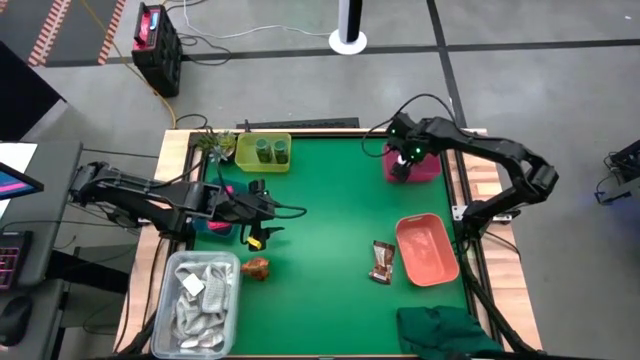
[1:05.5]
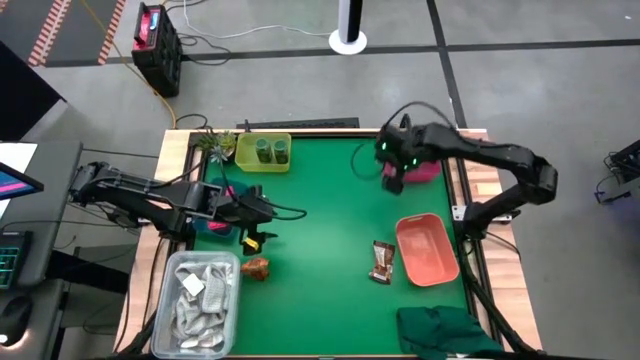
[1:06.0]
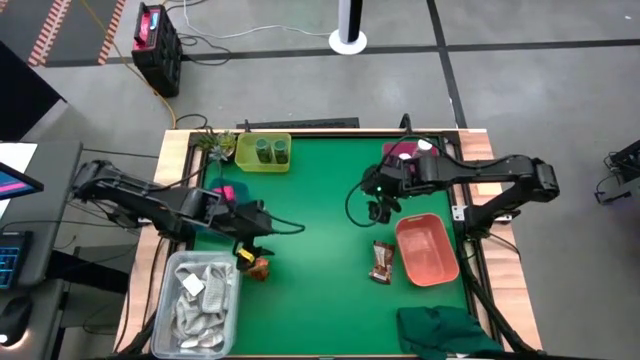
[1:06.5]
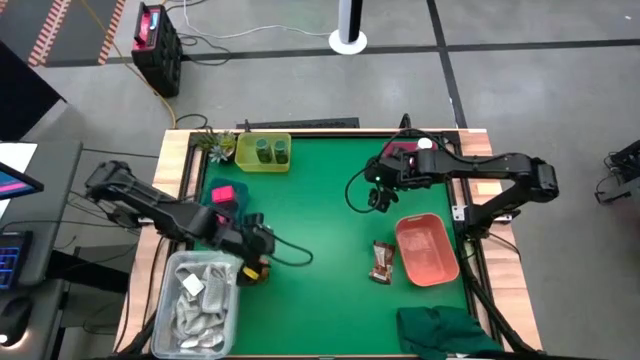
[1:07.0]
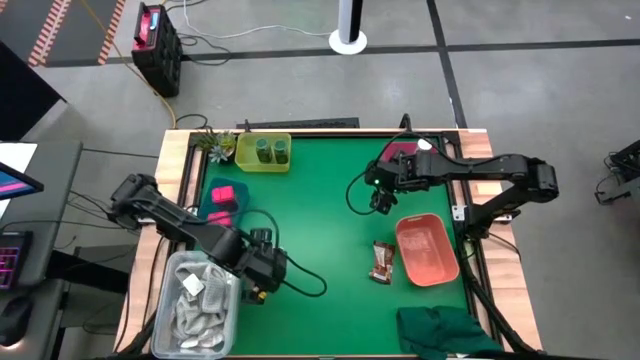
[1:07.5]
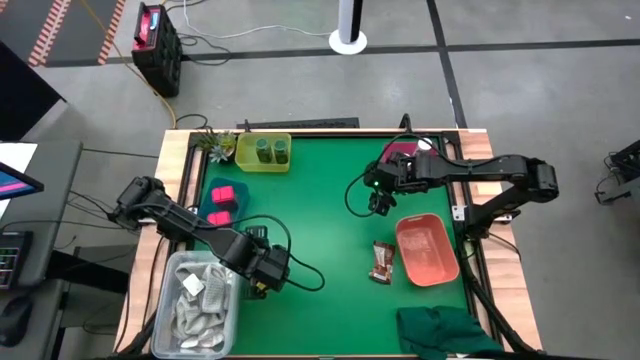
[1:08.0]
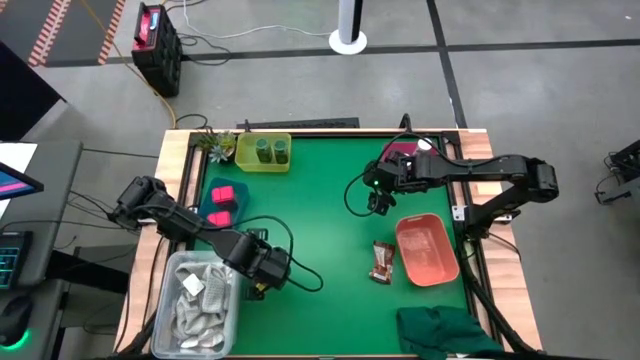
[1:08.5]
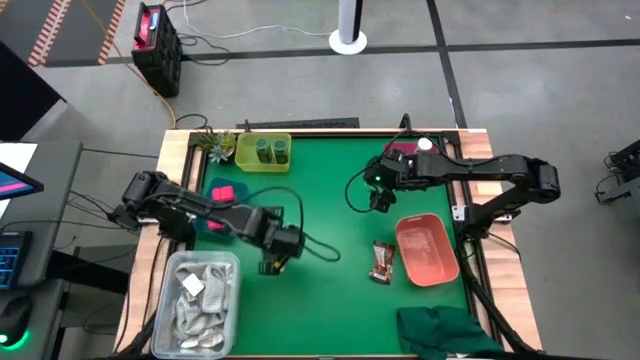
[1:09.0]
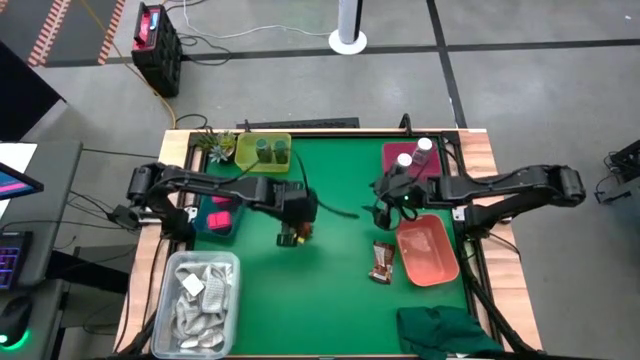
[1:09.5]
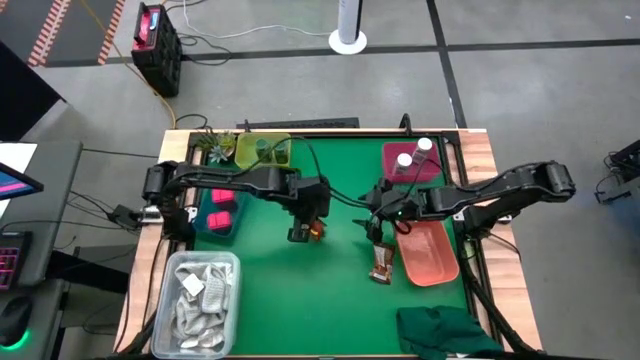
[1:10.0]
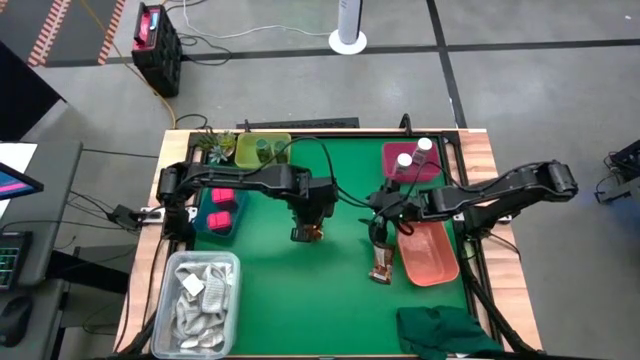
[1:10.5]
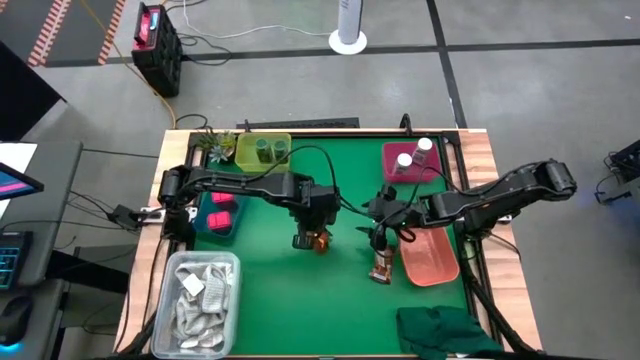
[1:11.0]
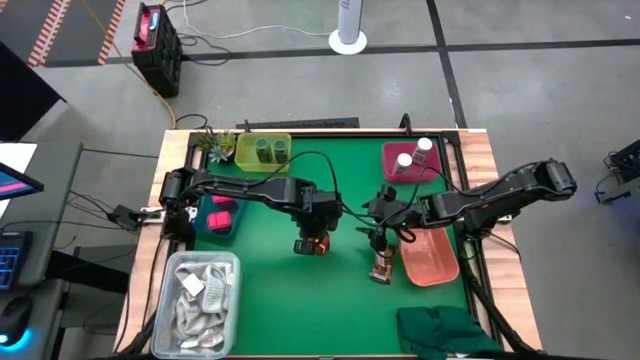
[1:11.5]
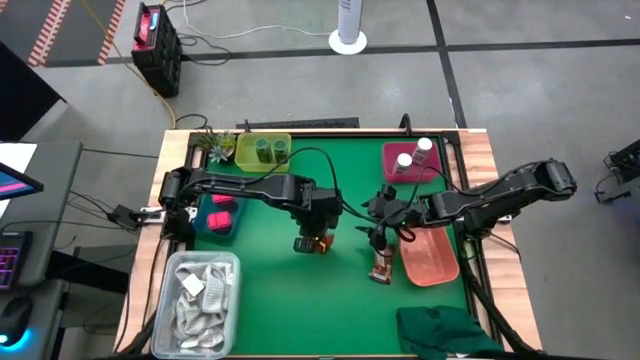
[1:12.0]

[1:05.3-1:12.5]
Task: Sort spices by type
Put the bottom left orange seasoning pack into the orange bin

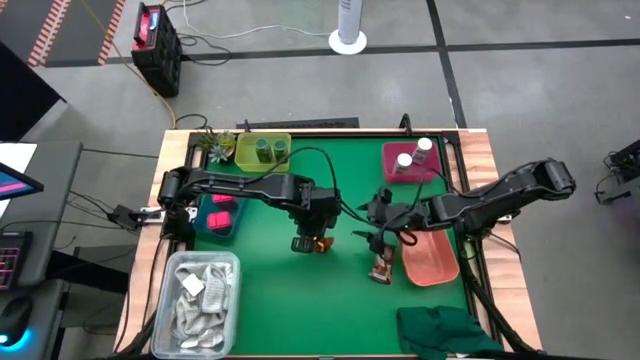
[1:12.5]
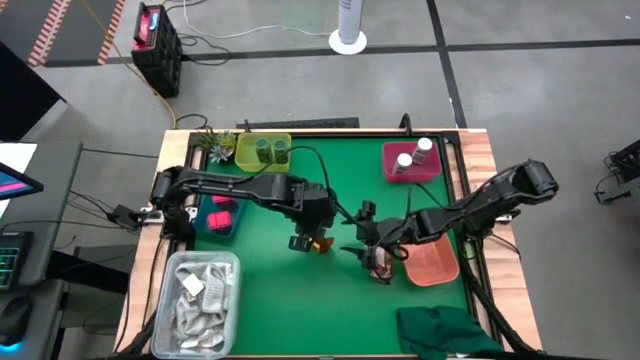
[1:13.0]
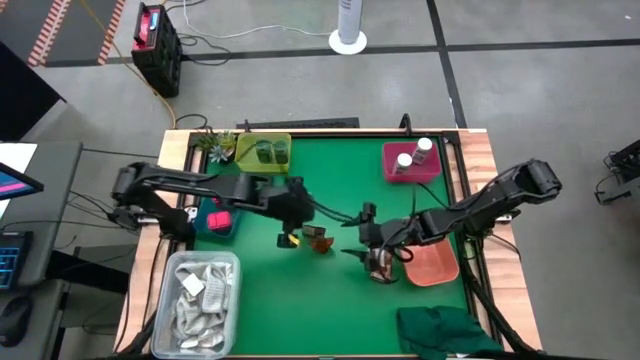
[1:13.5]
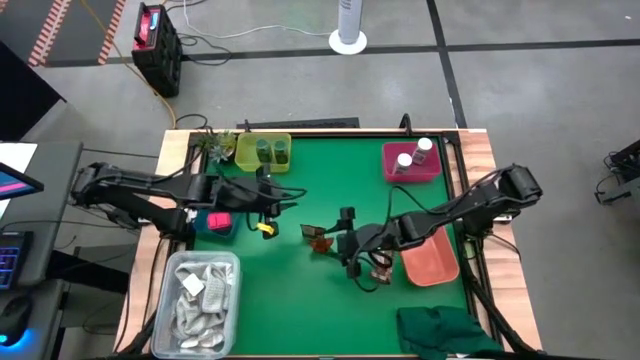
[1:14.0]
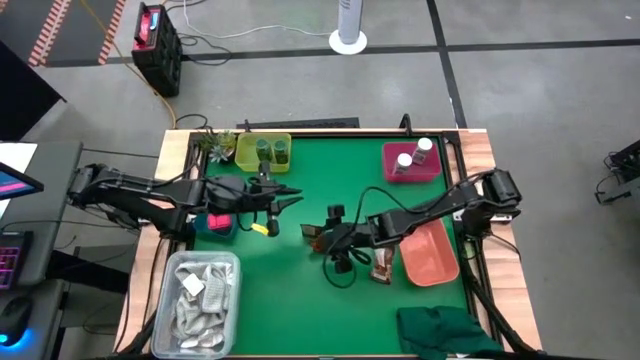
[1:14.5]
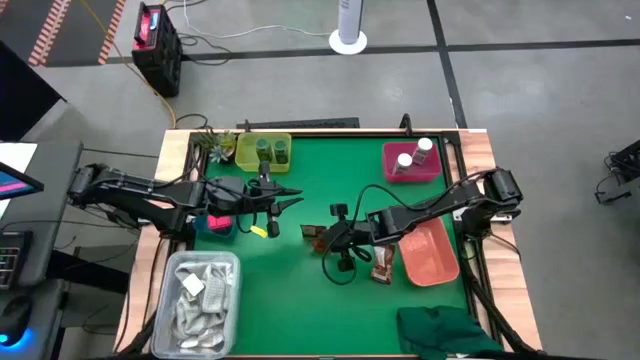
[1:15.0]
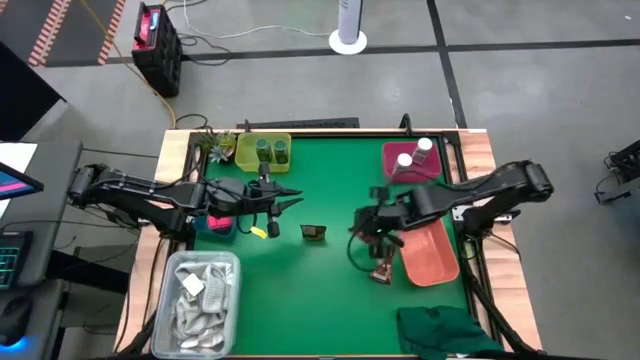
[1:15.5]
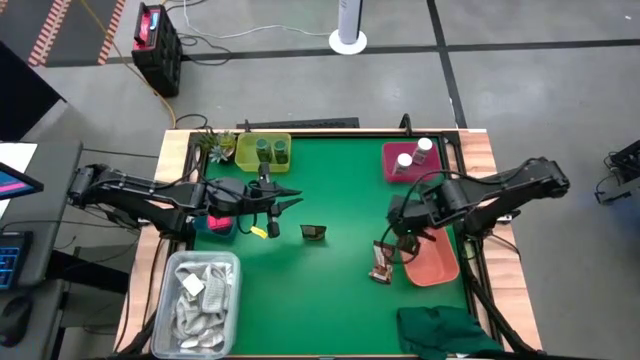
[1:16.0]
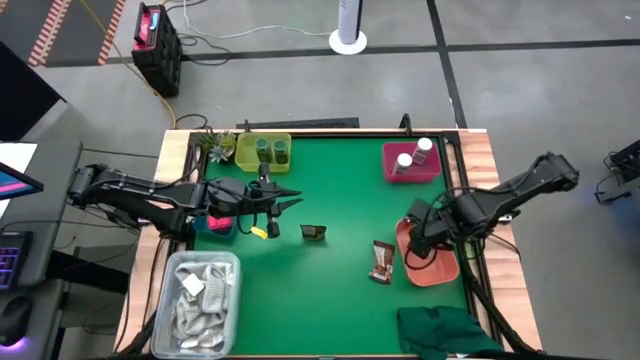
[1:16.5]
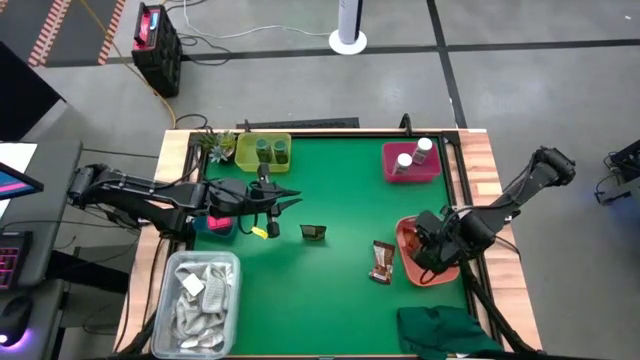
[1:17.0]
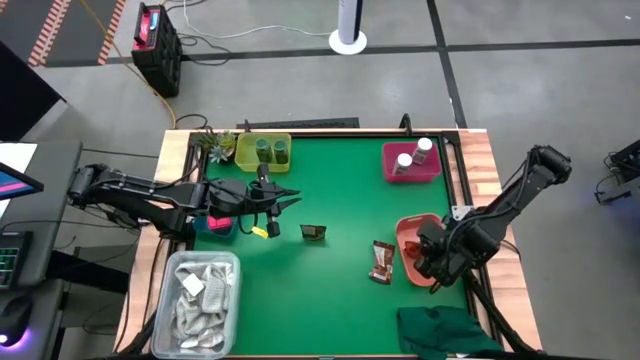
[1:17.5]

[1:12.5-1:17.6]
Put the middle orange seasoning bag into the orange bin

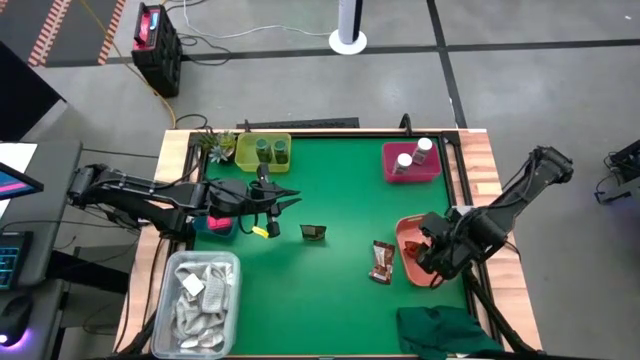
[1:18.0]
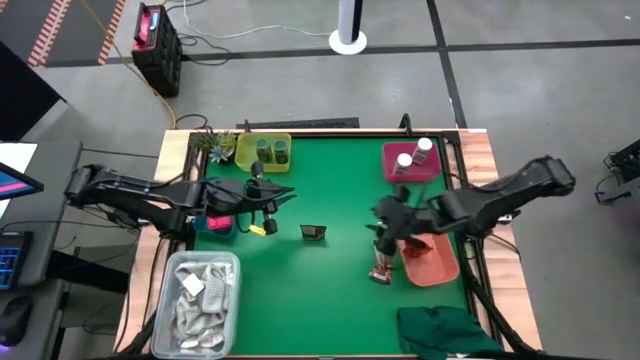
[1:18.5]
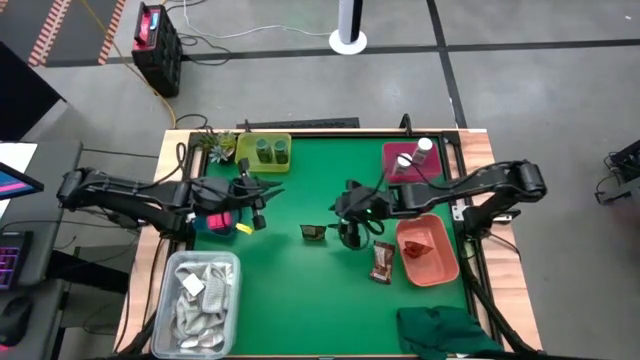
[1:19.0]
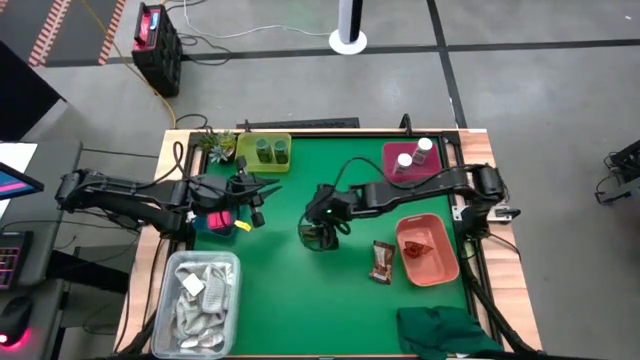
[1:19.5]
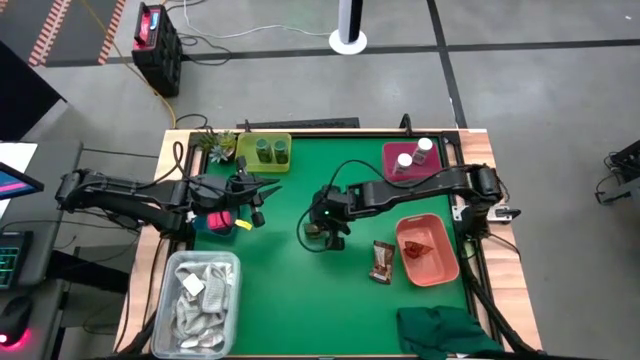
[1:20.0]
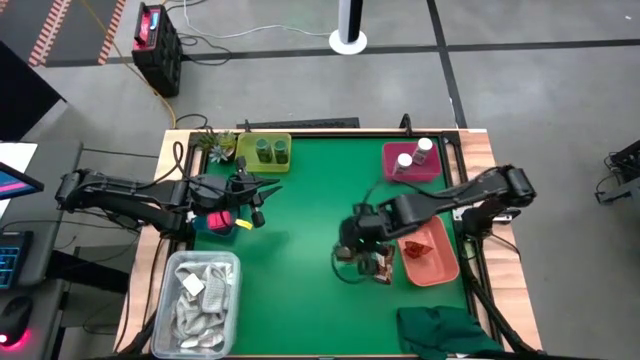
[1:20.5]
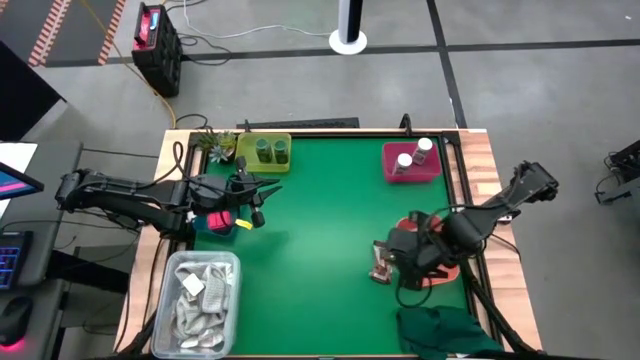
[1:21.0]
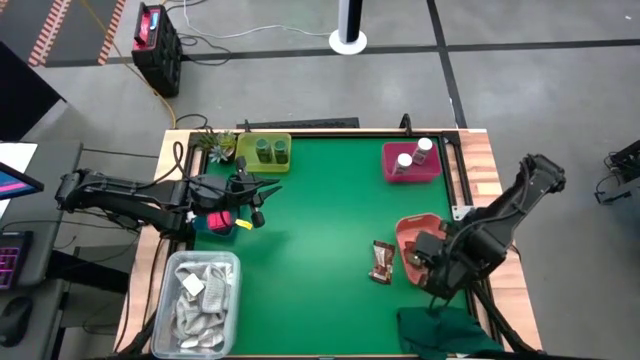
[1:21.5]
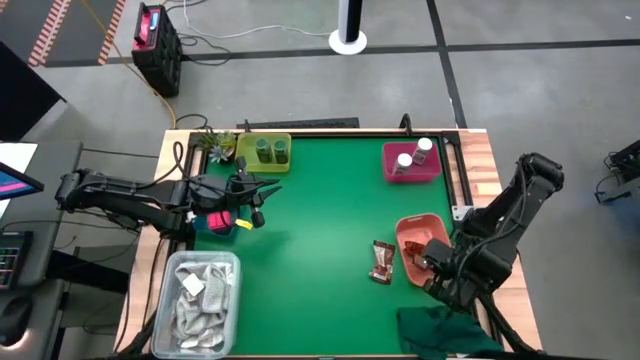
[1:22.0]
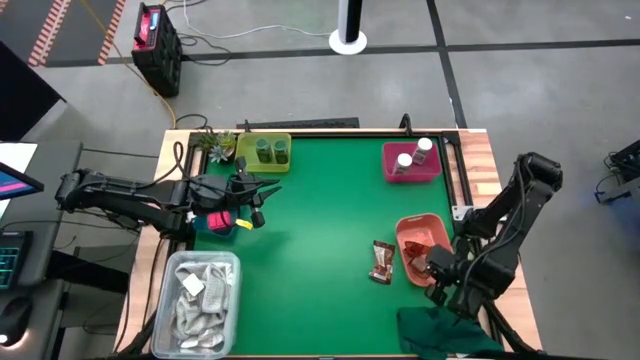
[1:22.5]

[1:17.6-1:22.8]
Put the top orange seasoning pack into the orange bin

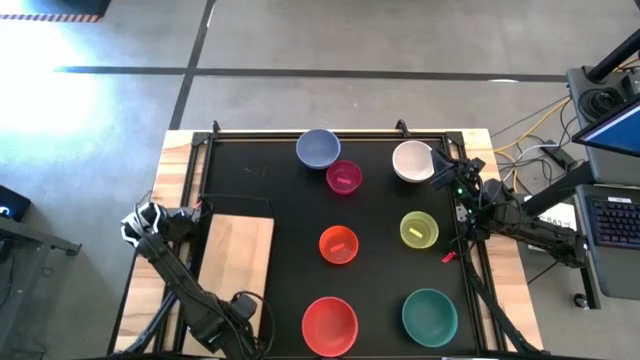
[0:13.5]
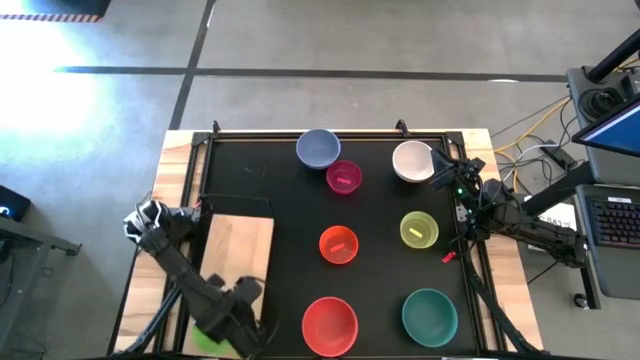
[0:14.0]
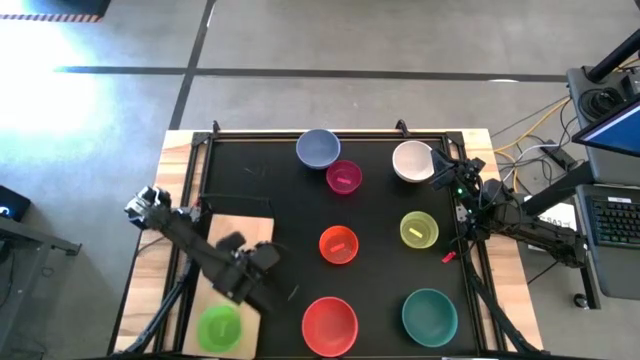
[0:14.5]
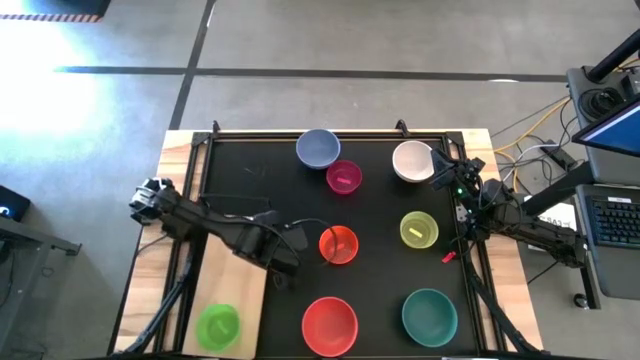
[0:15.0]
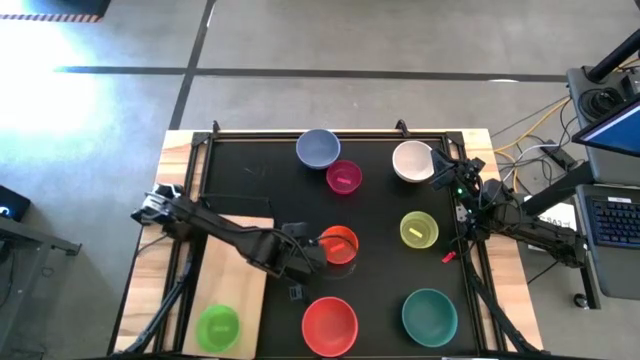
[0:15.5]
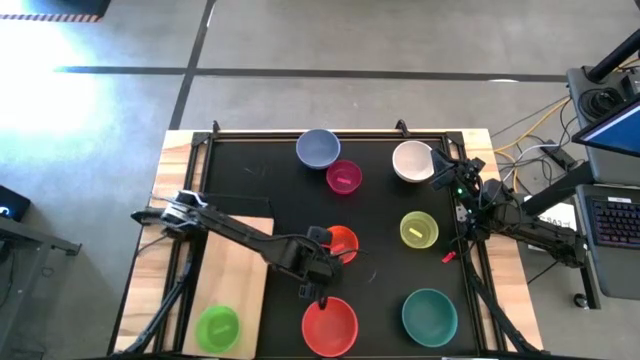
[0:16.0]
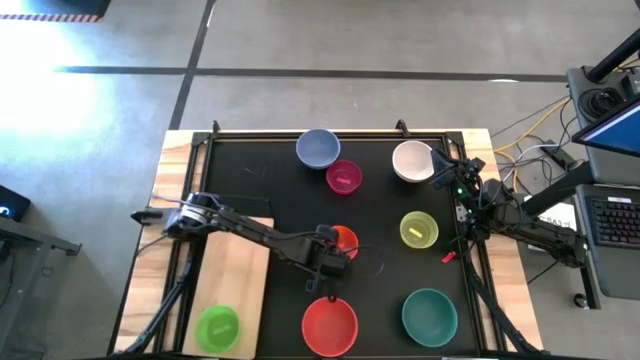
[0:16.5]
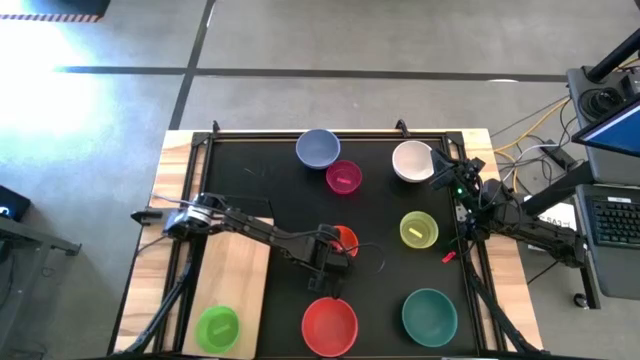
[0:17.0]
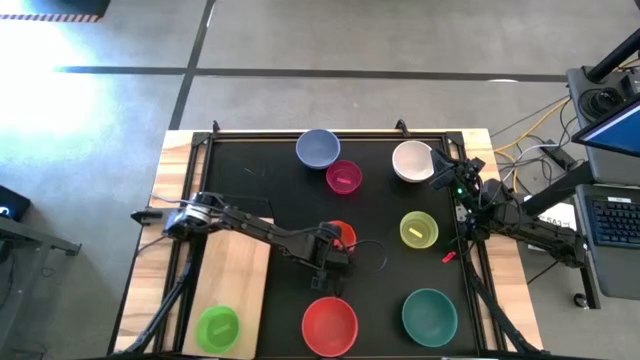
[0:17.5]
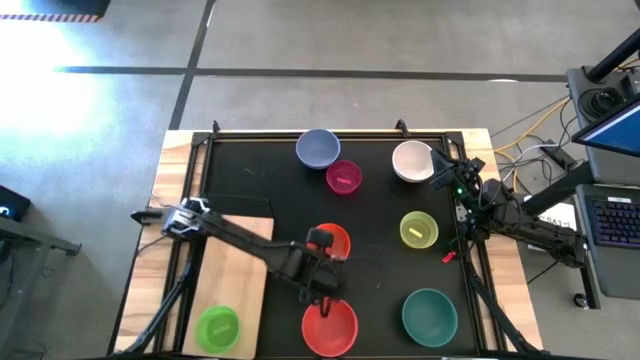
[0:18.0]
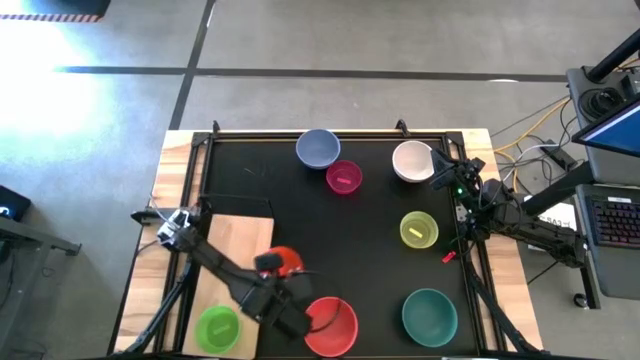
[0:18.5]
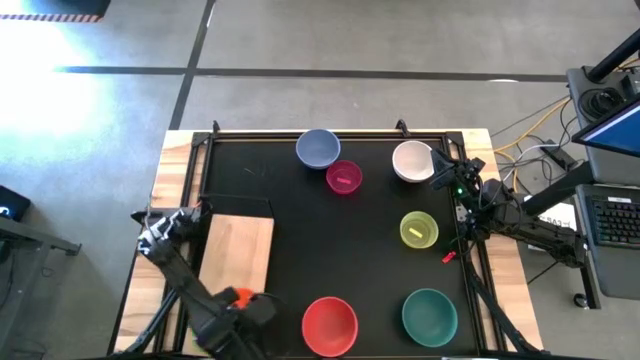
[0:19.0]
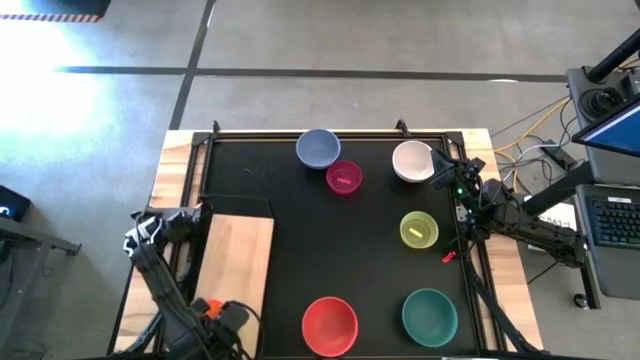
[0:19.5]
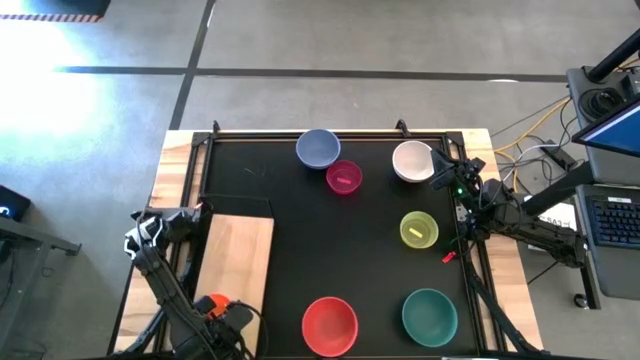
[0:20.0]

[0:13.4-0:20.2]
Task: Place and stack bowls onto a shelf
Stack the light orange bowl on the green bowl on the shelf
